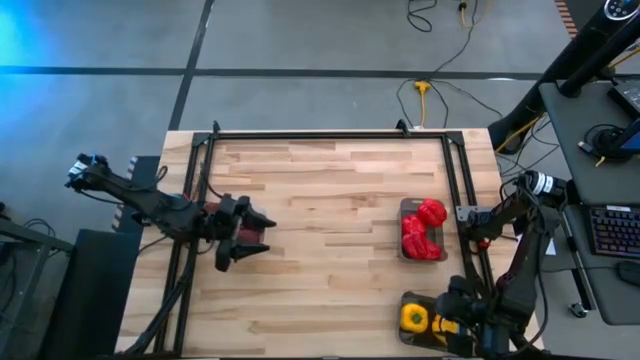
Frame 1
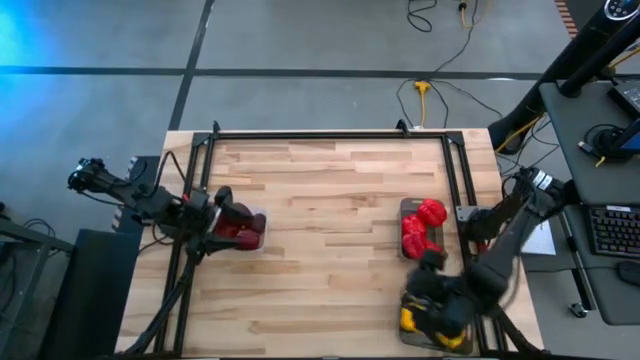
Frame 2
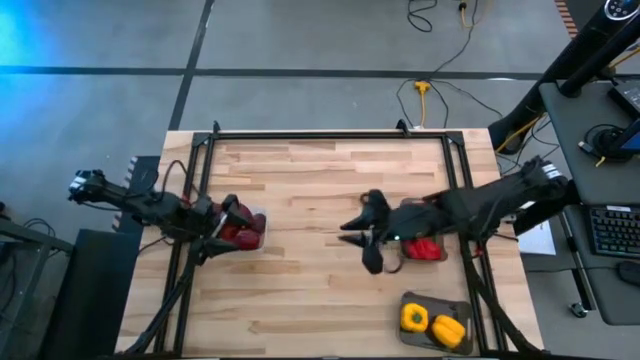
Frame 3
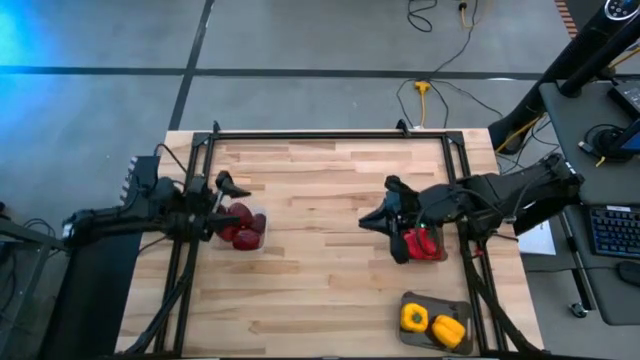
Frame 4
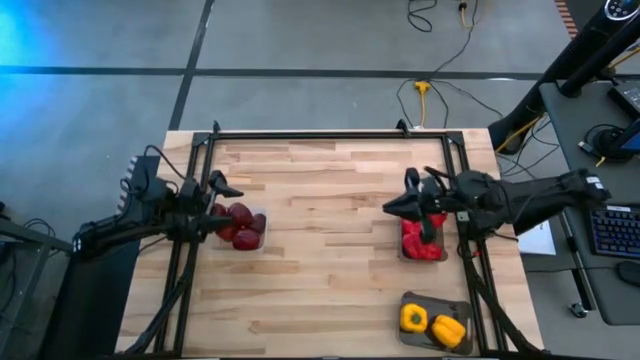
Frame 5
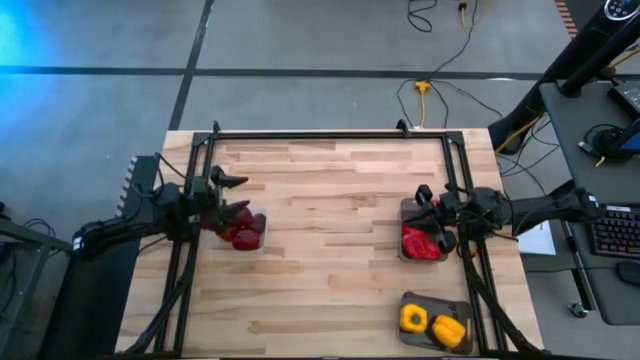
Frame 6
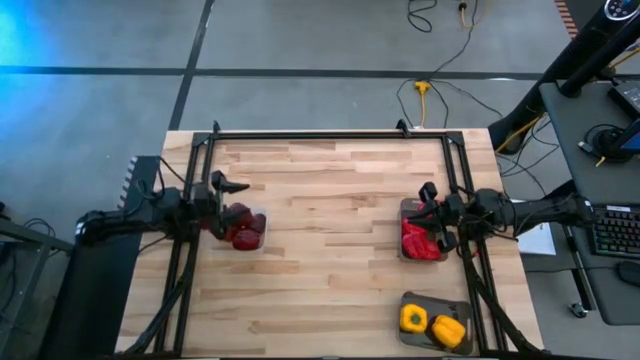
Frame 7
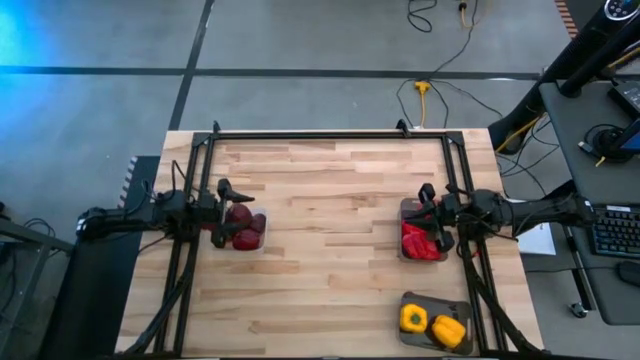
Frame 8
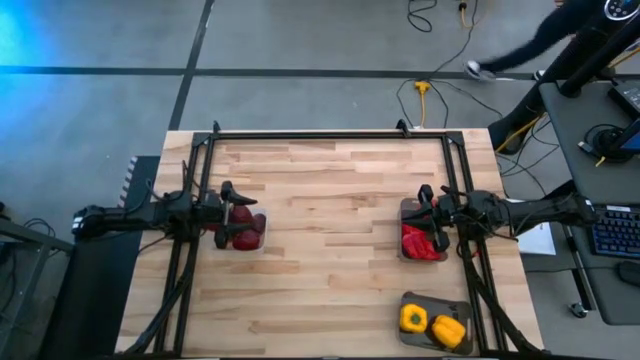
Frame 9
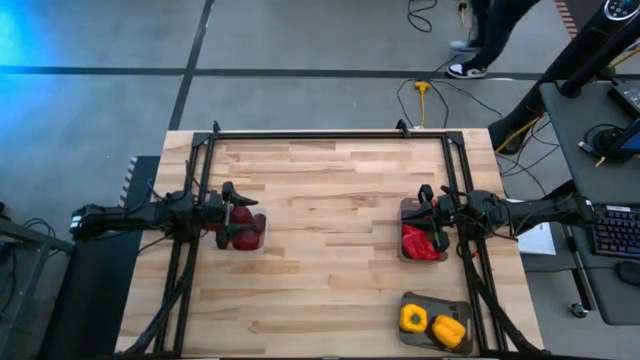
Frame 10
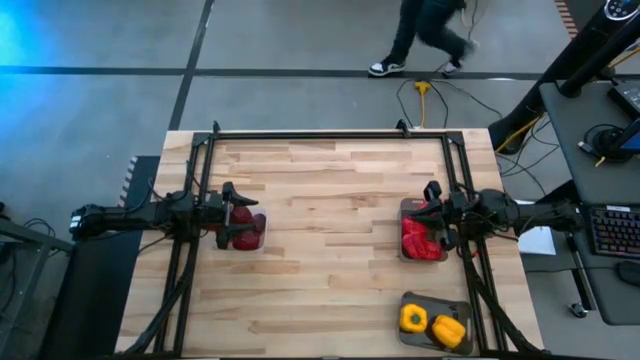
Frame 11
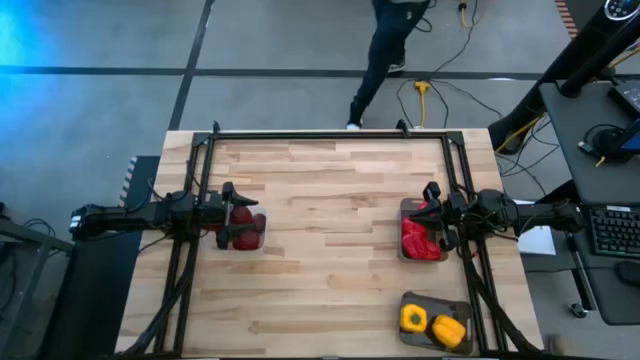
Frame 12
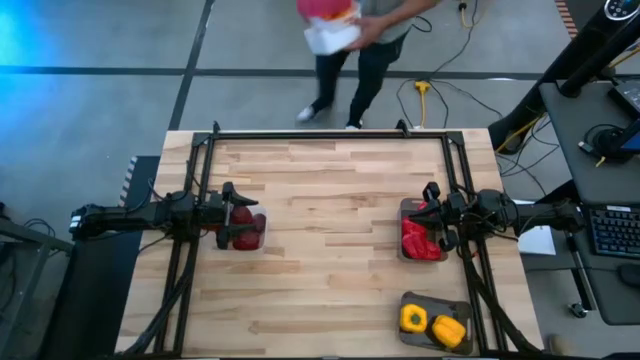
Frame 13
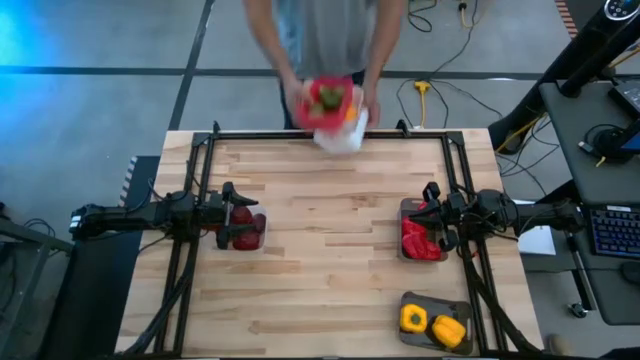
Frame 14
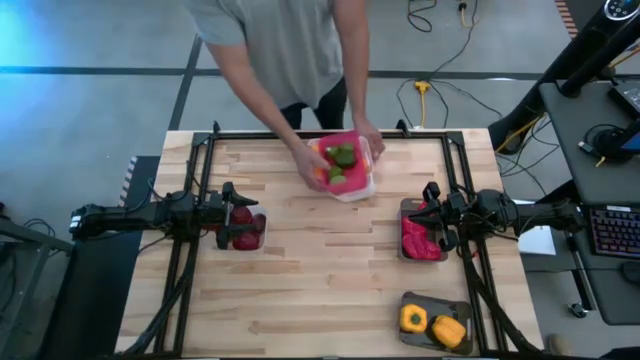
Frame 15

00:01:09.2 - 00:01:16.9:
Task: Sort produce into baskets
Return to Home Position

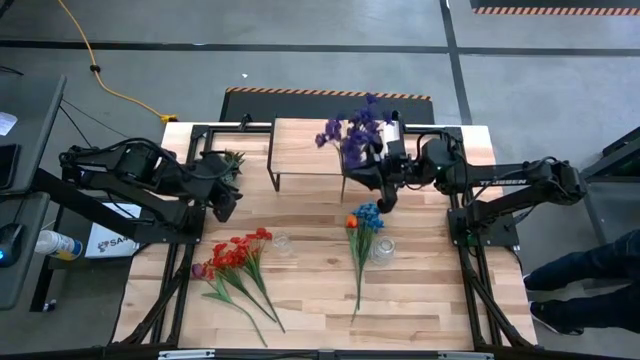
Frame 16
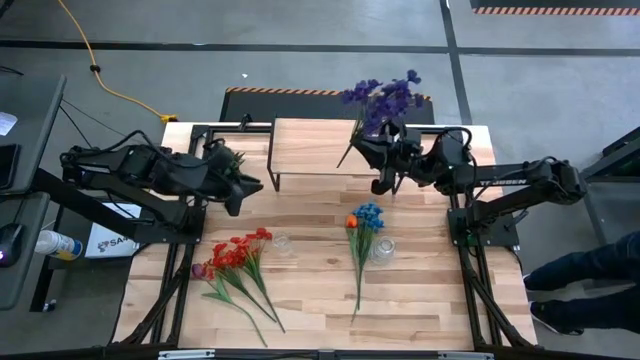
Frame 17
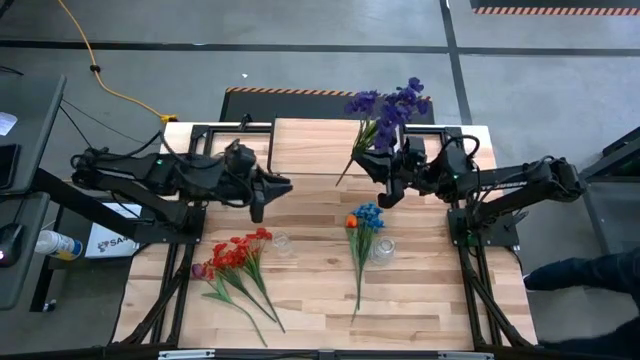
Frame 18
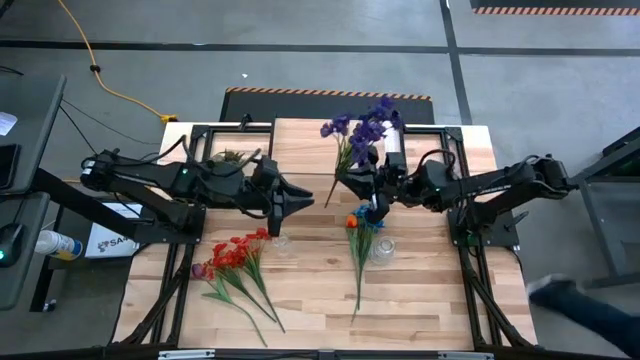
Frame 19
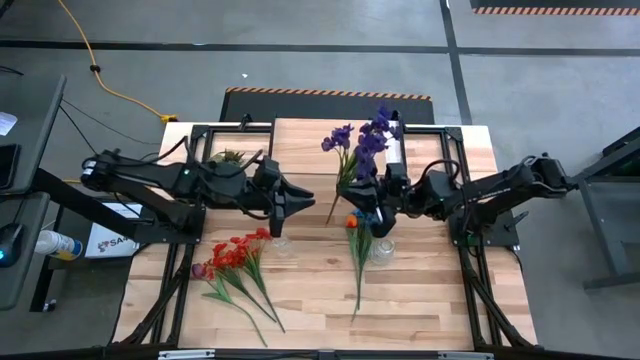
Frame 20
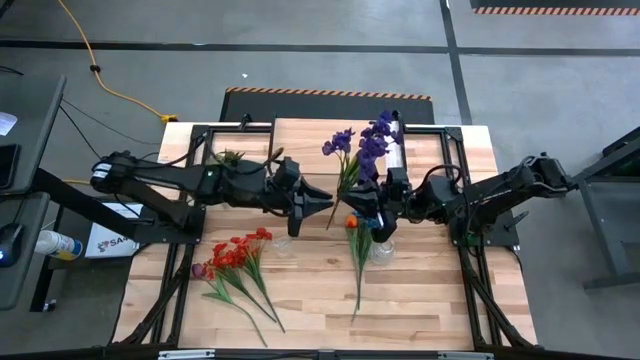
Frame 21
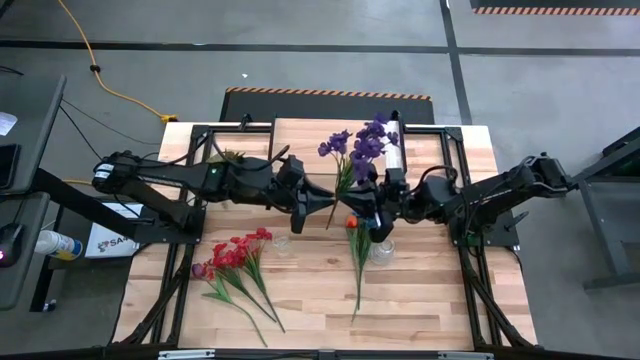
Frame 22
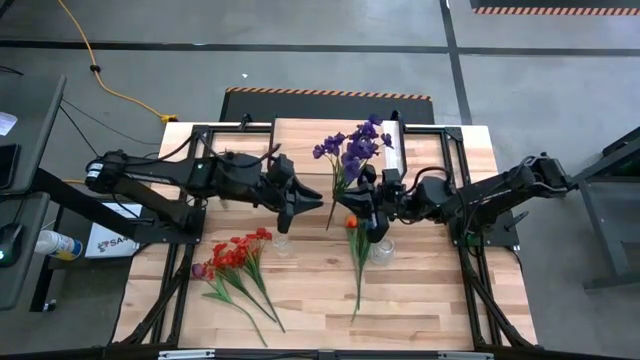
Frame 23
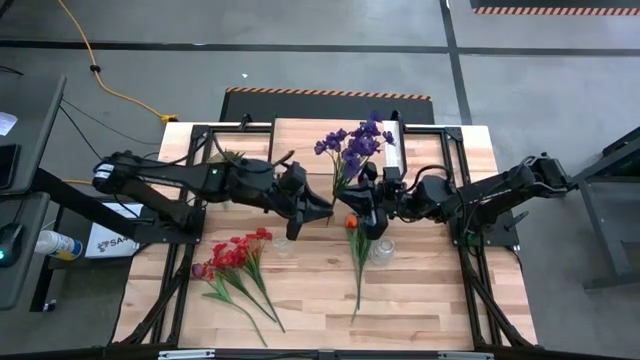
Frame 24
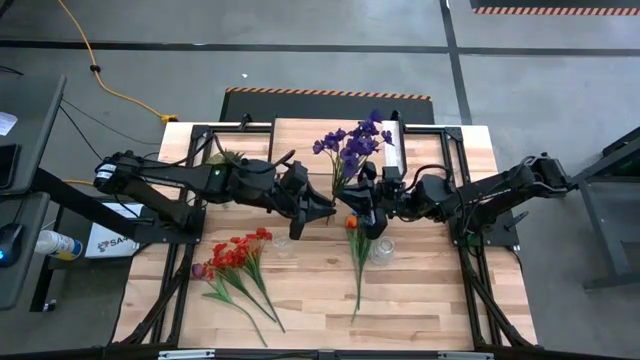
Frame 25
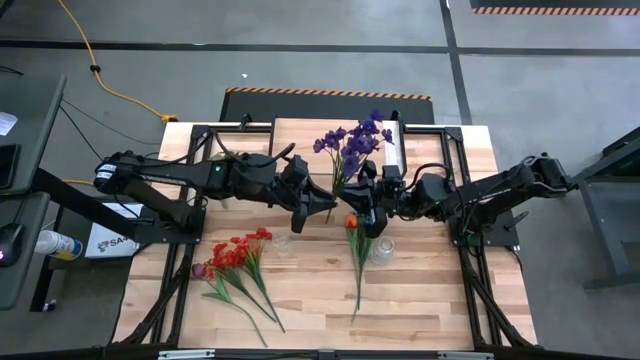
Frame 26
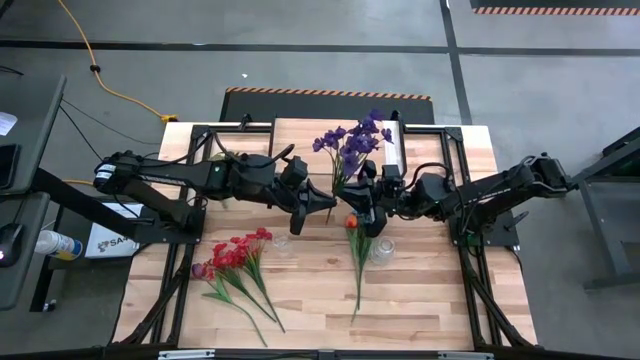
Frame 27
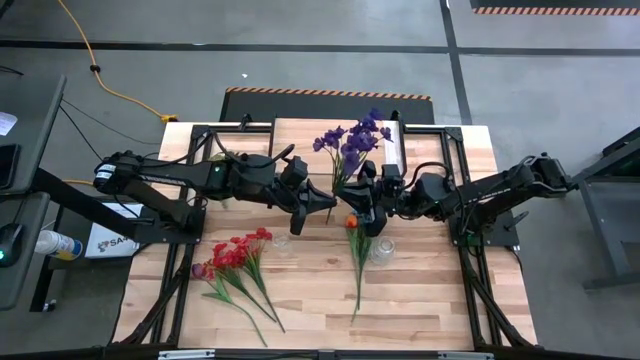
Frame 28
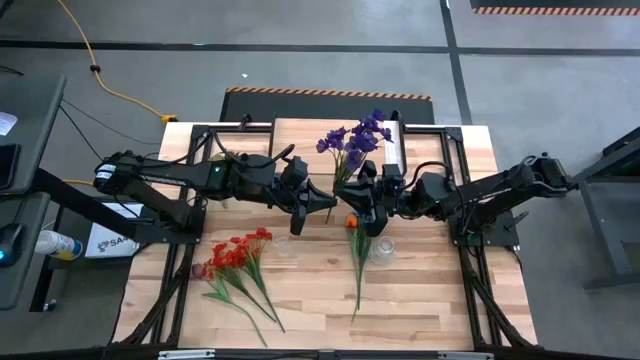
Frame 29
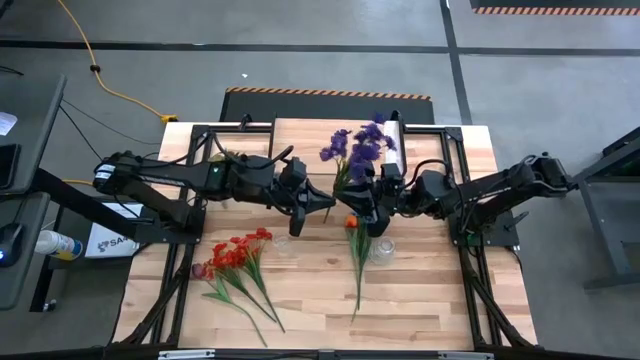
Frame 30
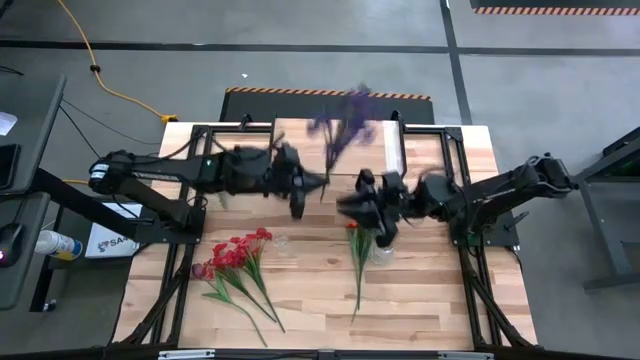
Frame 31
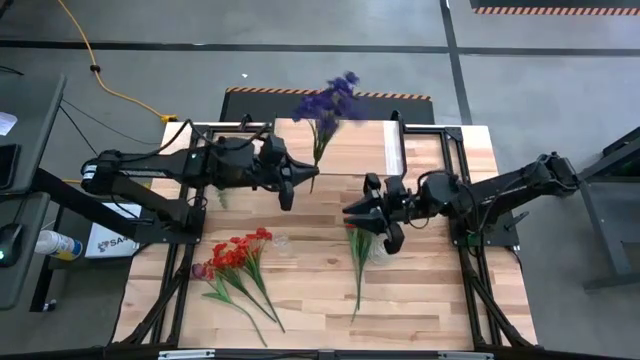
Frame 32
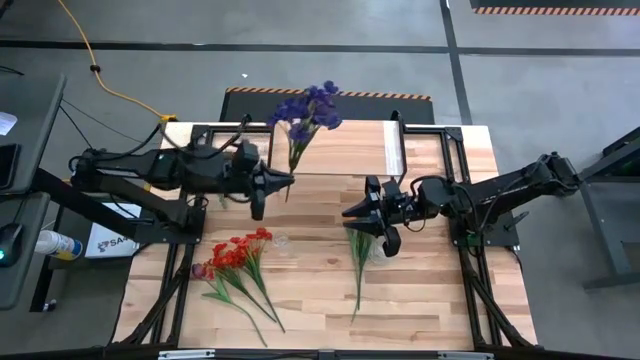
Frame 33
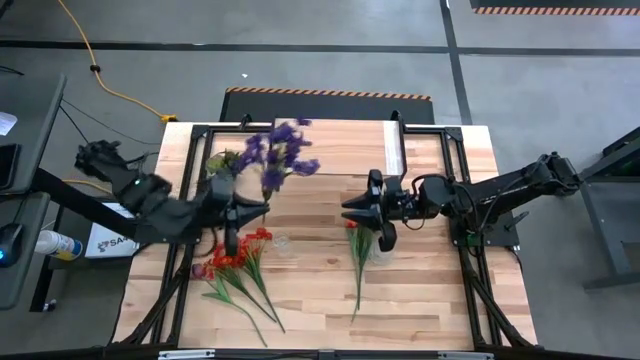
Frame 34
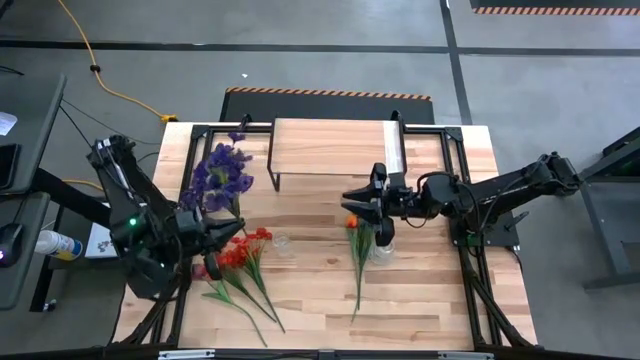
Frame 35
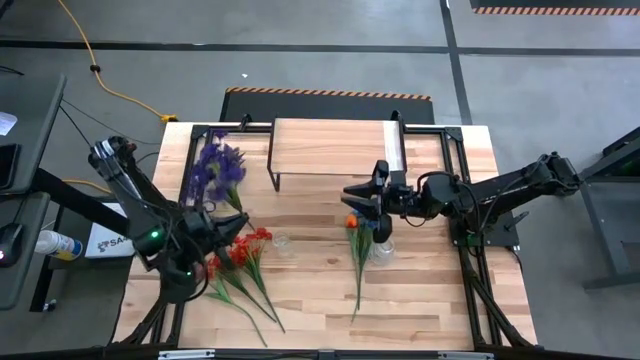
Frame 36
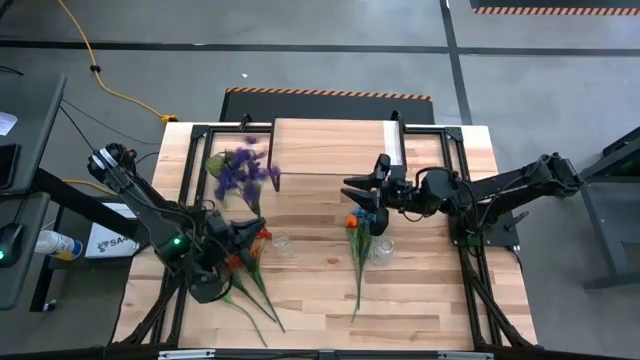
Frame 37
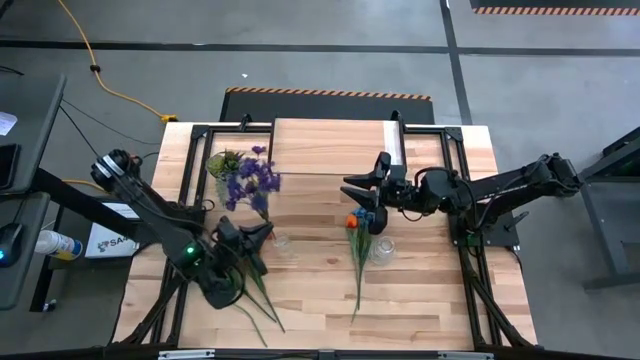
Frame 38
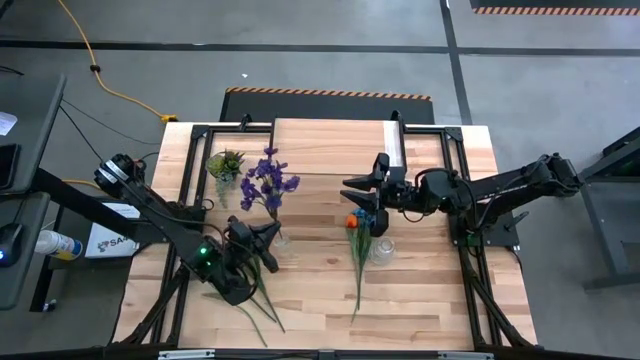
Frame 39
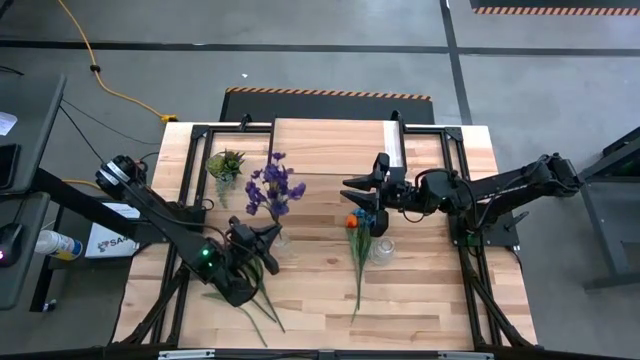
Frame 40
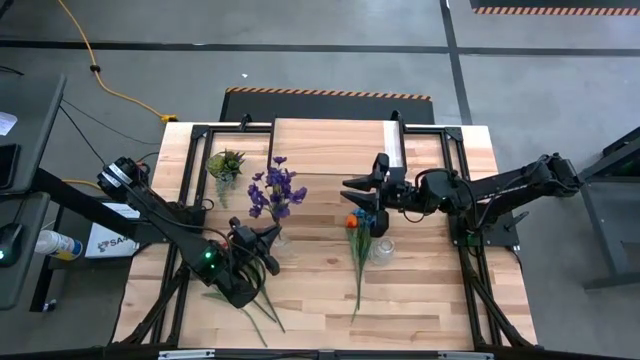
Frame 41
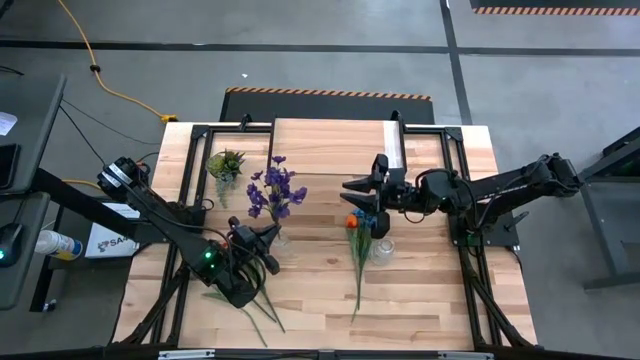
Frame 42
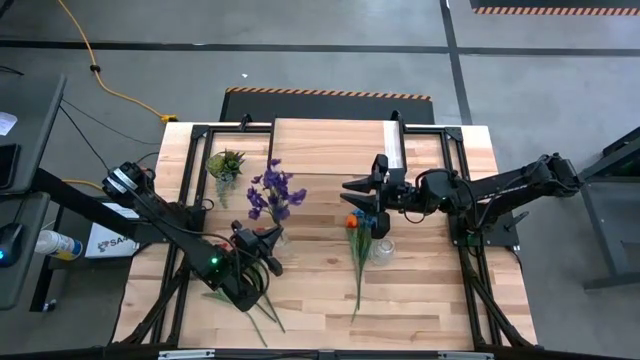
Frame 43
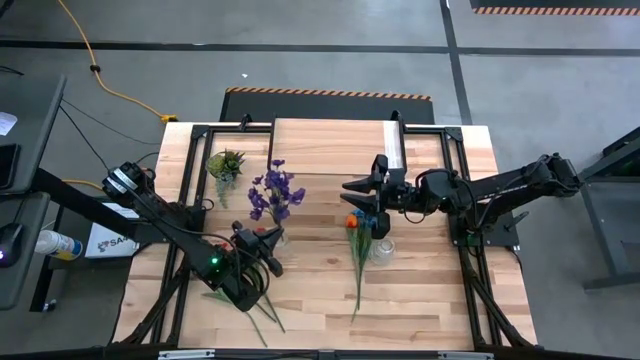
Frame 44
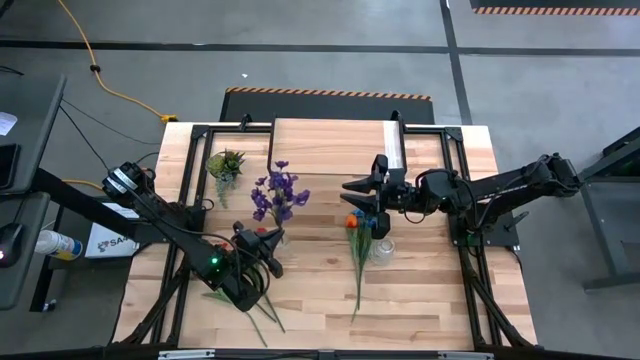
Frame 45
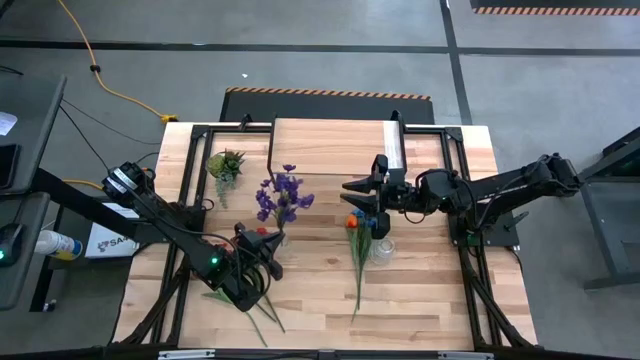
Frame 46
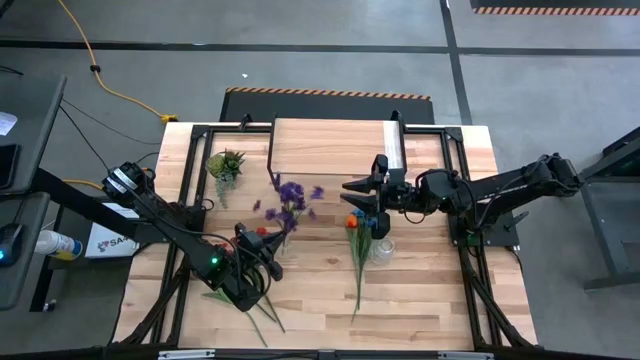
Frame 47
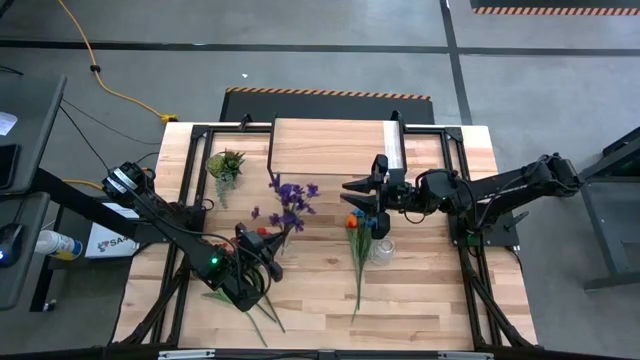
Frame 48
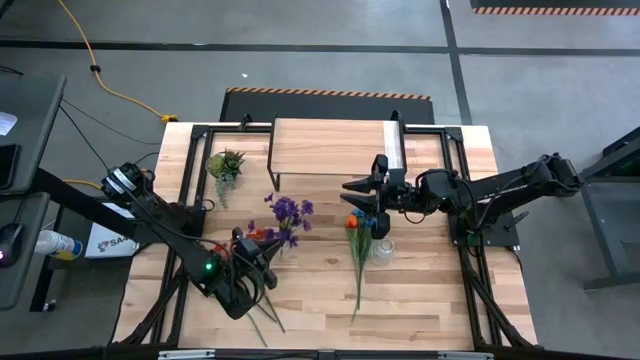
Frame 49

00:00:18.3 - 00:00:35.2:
Task: Pick and place flowers into a vace then onto a shelf
Put the purple flower into the left transparent flower vase
